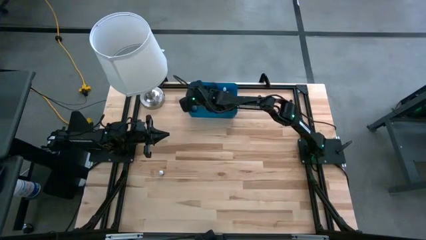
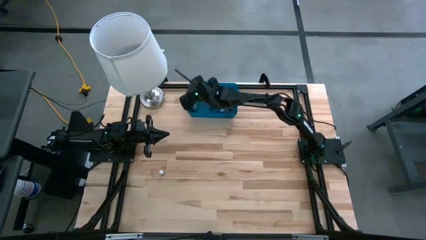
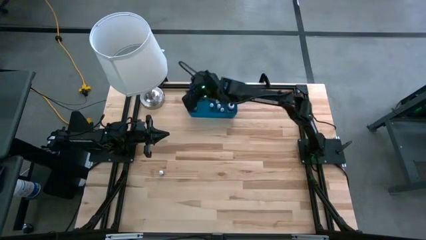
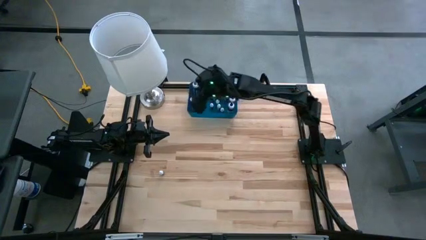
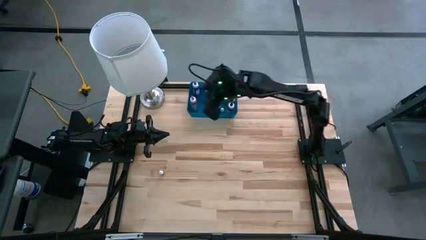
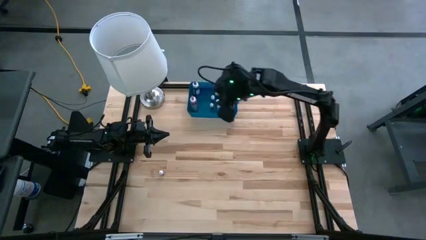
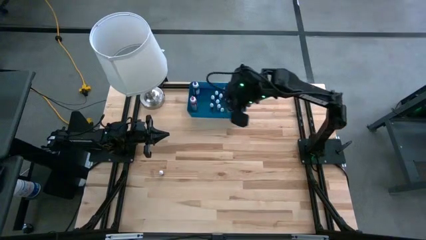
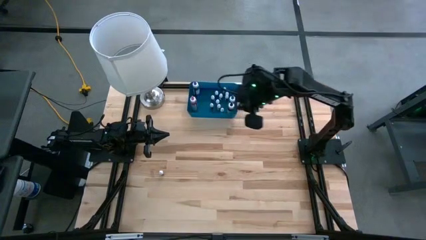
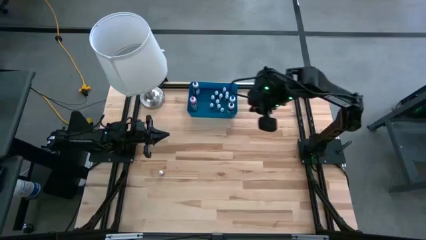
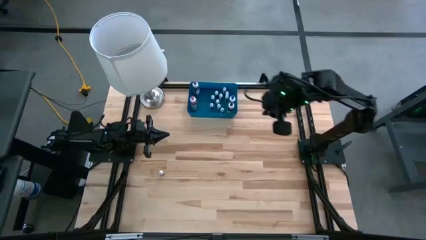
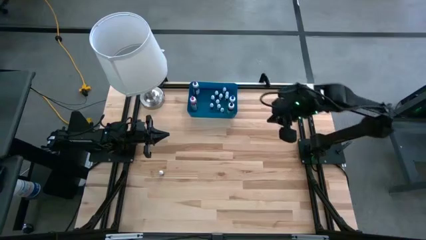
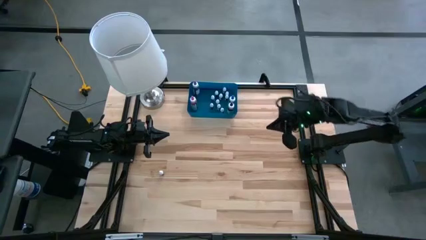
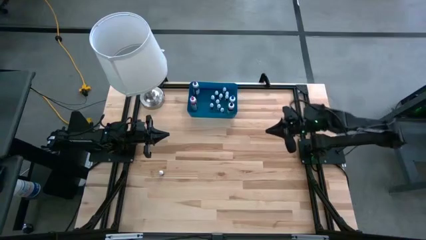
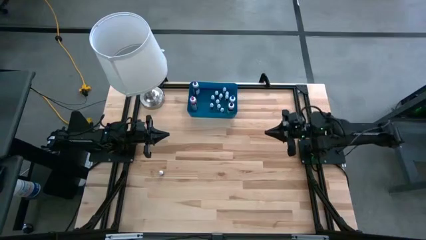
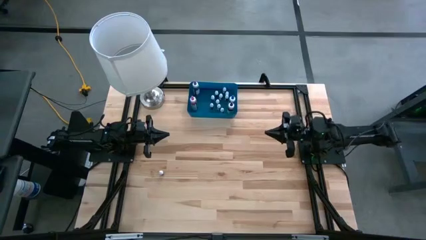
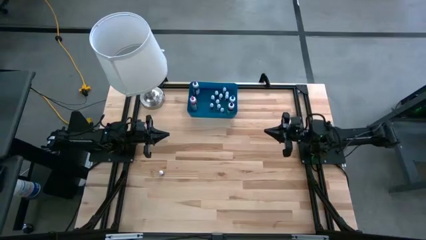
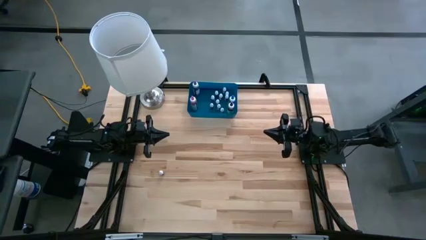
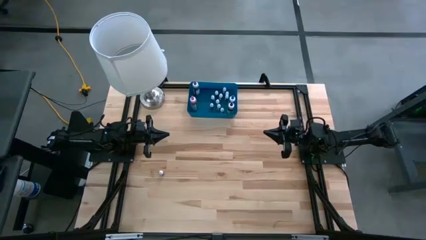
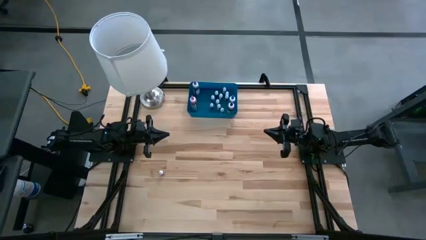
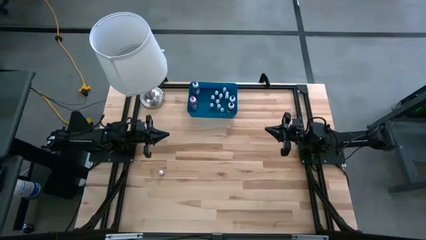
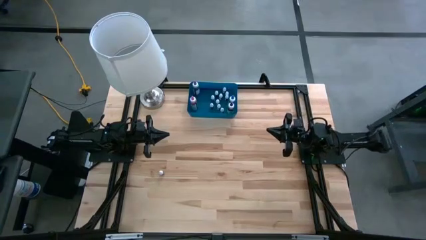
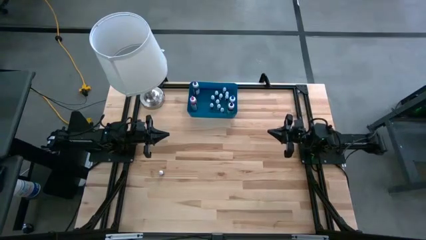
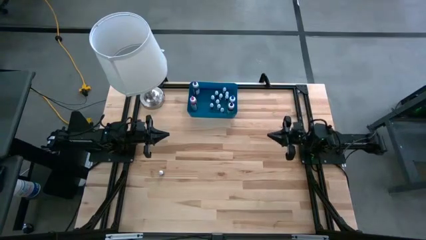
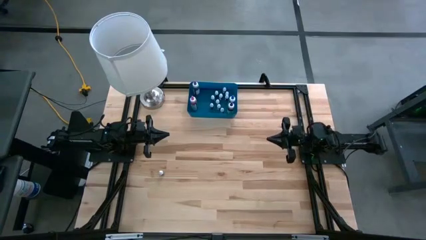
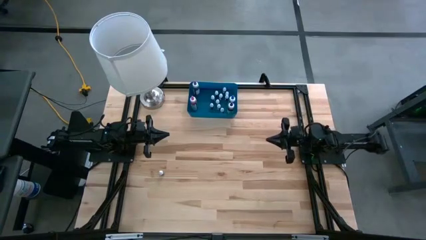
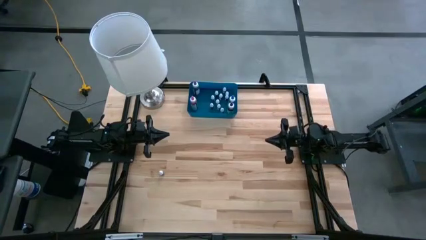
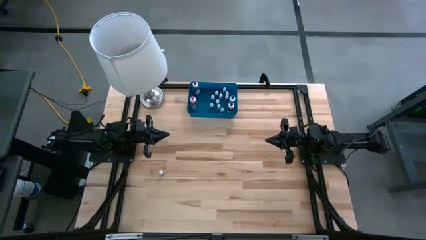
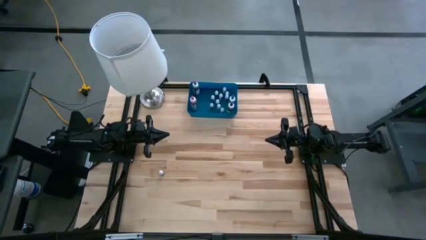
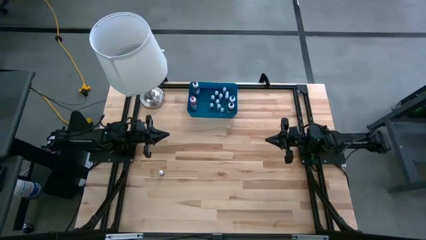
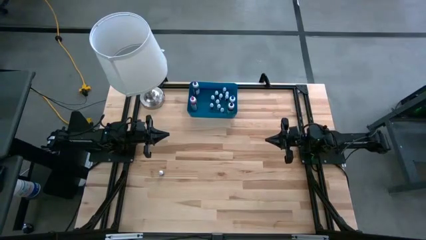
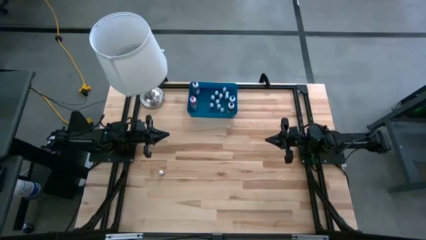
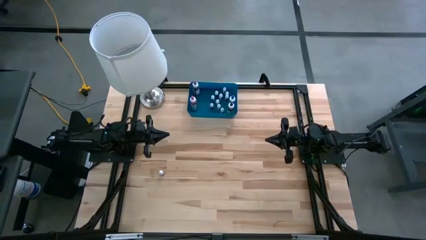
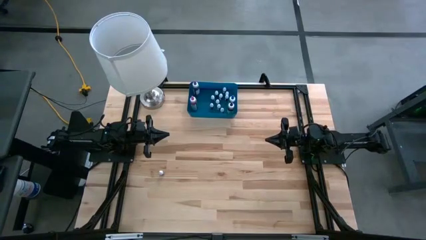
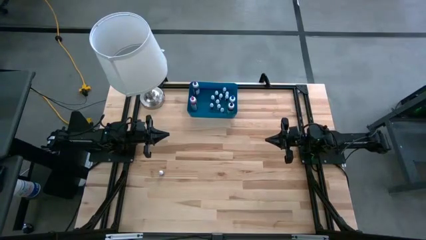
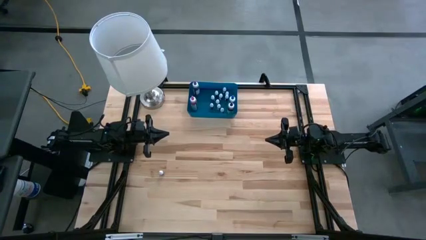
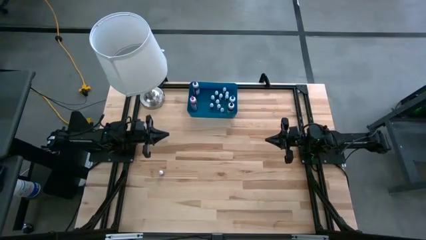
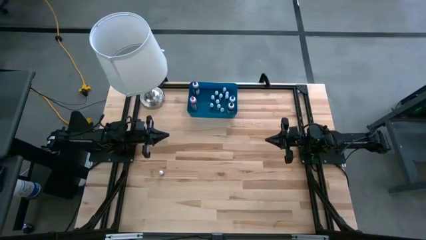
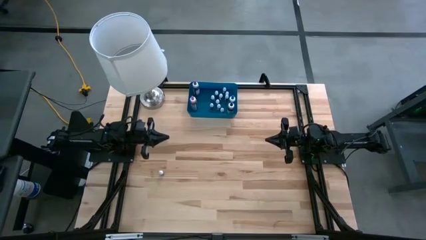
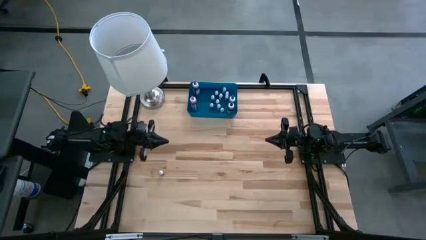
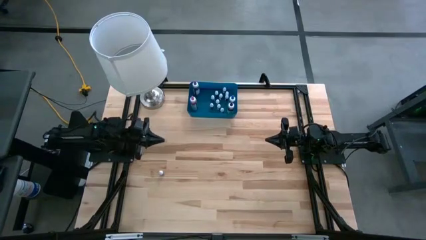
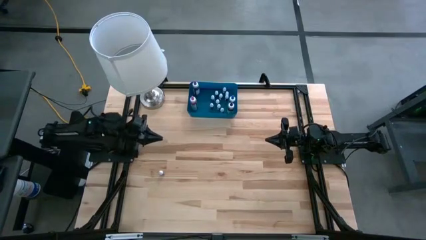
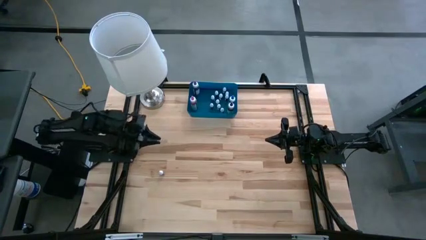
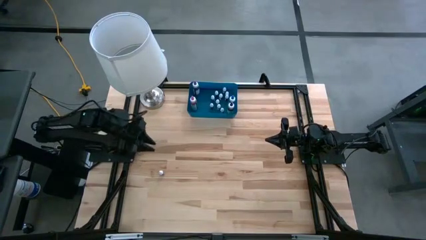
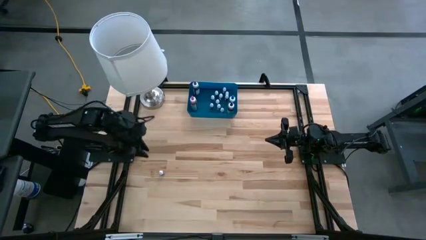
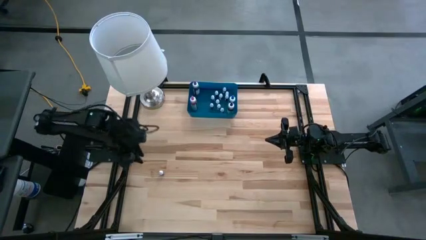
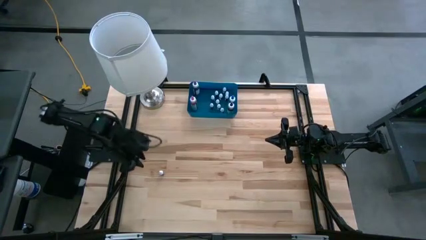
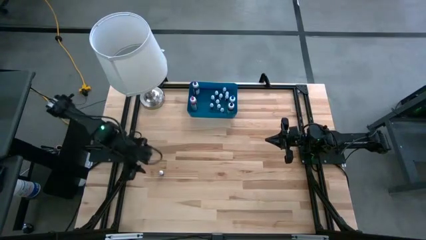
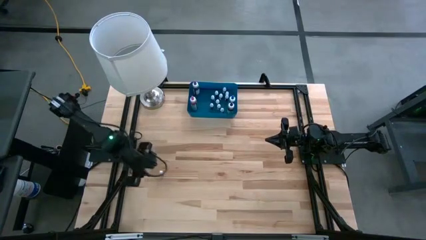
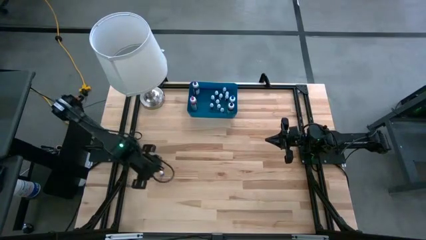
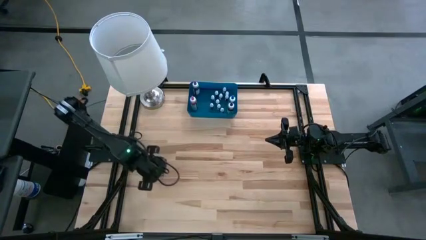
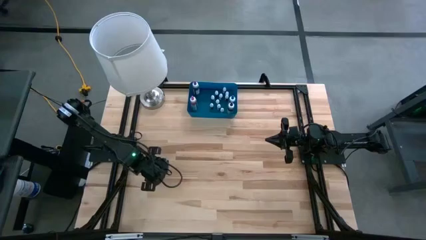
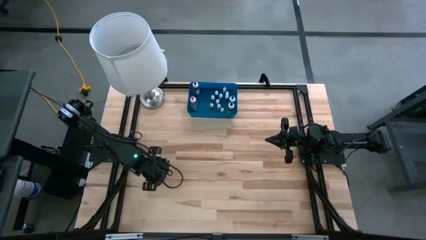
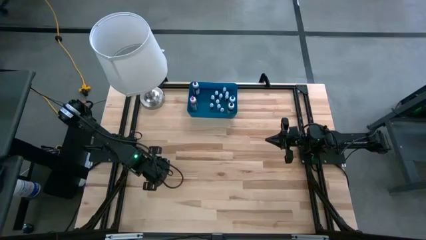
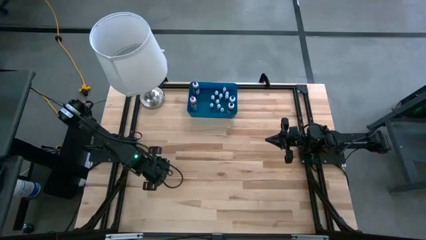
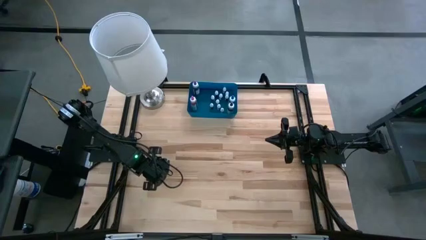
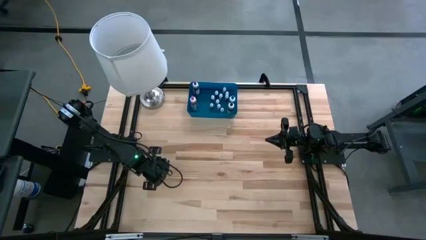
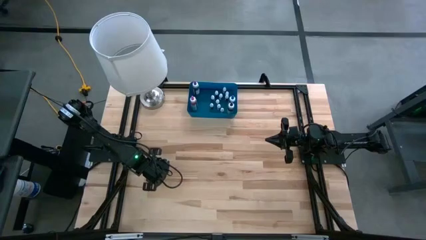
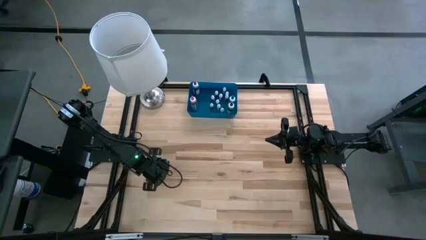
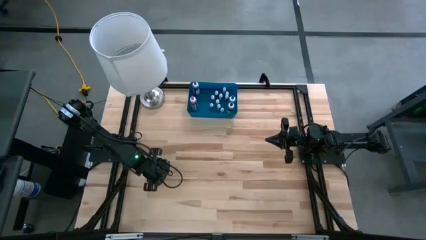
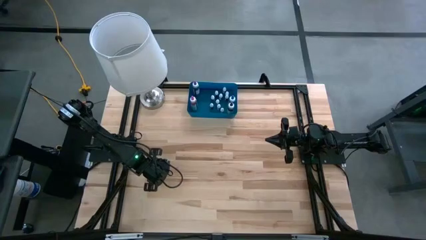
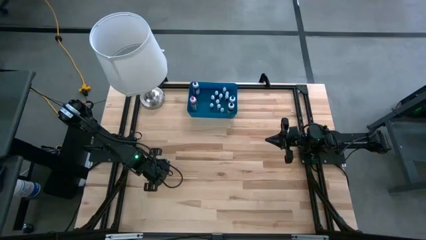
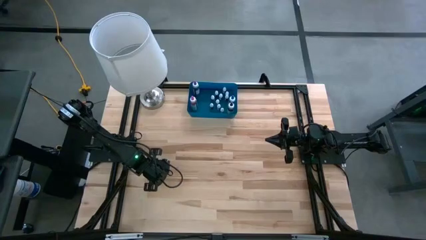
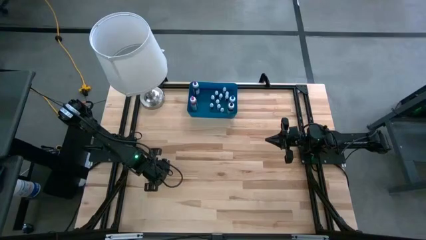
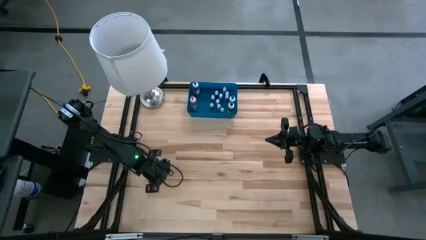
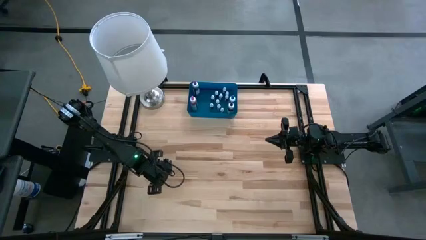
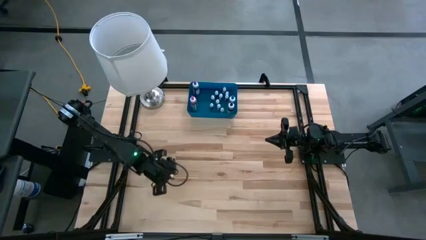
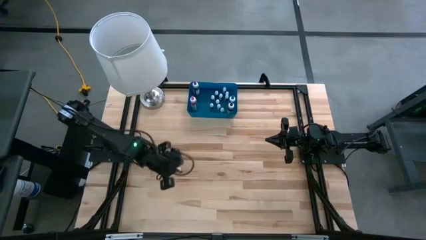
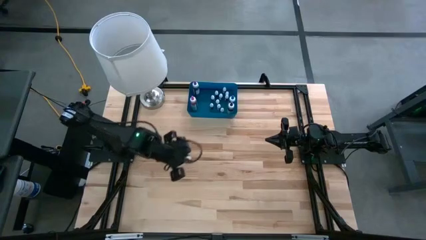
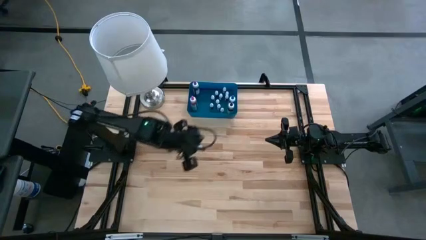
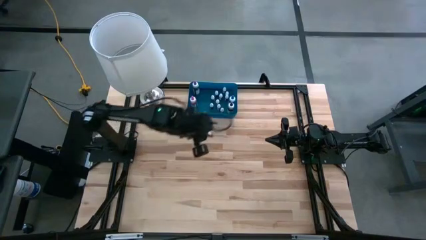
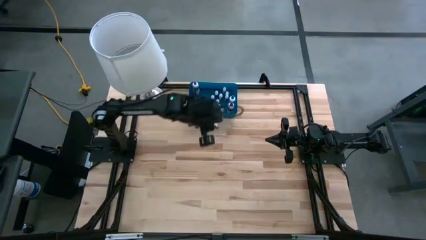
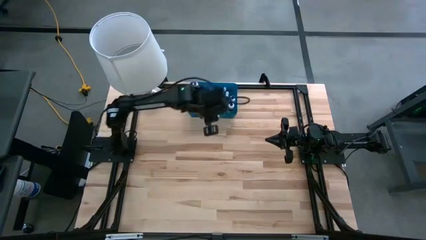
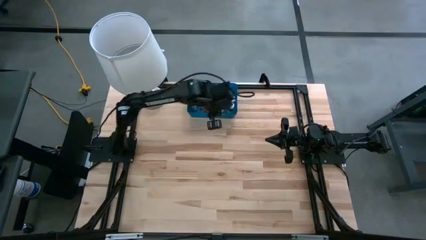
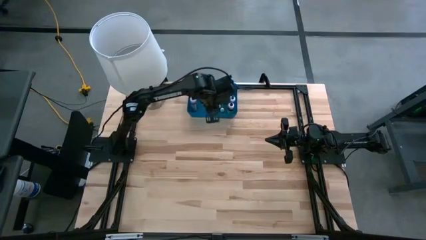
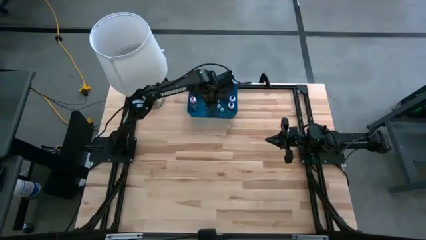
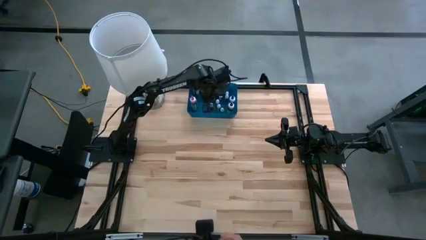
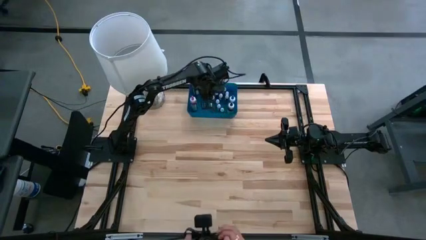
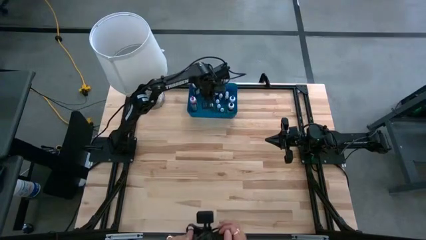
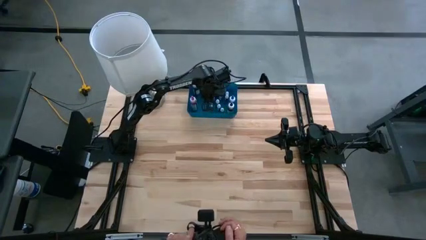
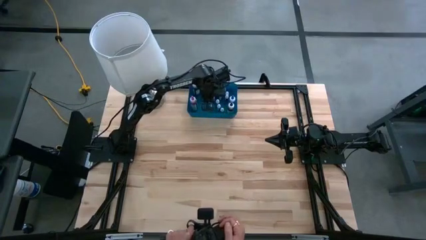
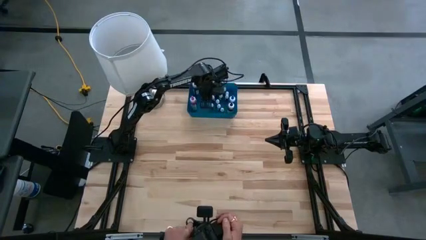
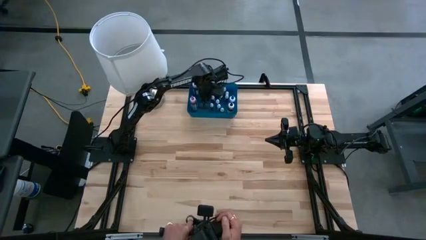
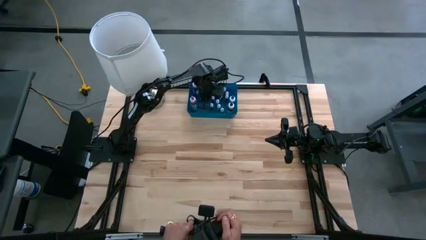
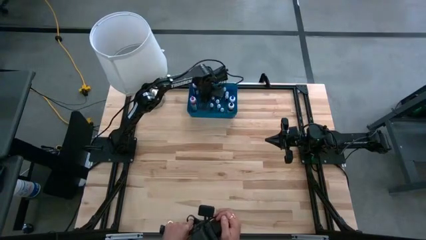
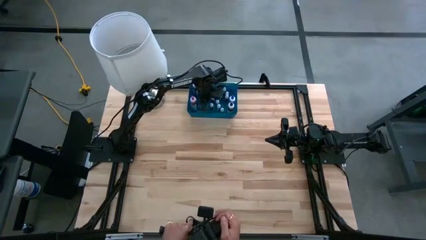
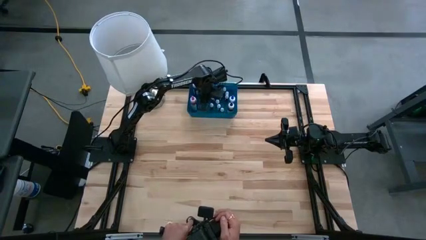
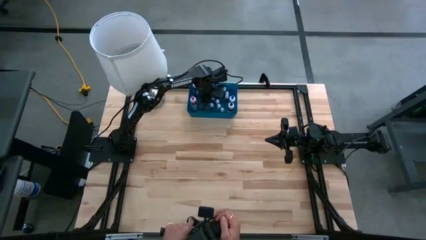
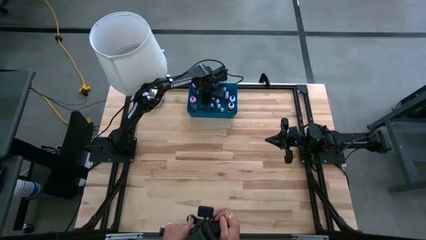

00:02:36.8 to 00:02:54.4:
Task: Pick & Place food coloring
Put the small orange food coloring bottle into the blue bin
